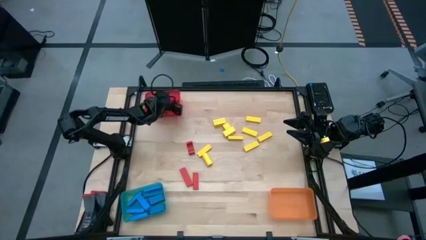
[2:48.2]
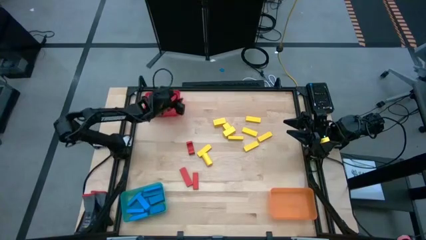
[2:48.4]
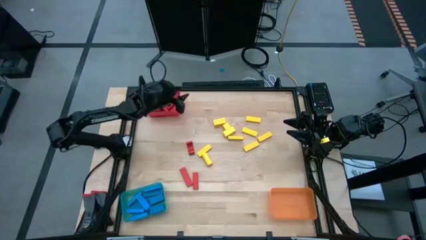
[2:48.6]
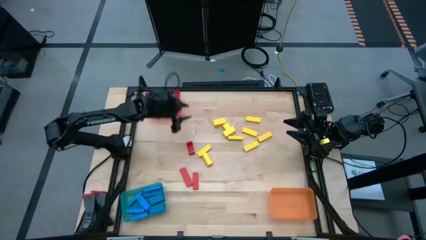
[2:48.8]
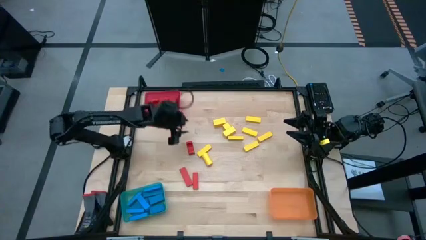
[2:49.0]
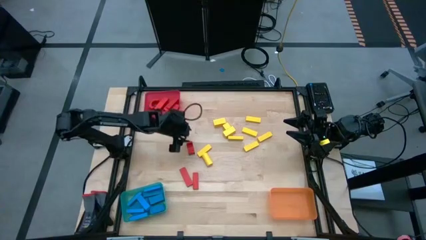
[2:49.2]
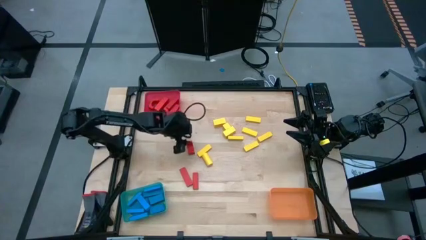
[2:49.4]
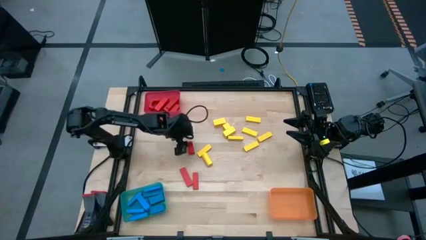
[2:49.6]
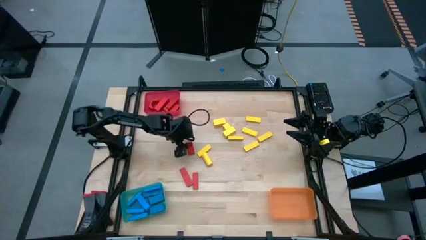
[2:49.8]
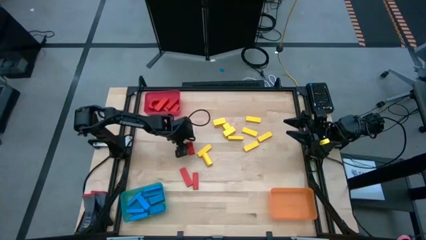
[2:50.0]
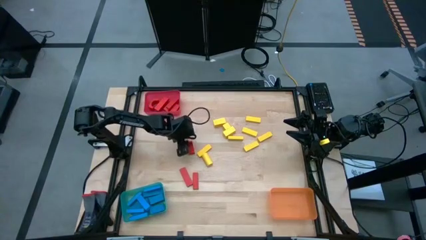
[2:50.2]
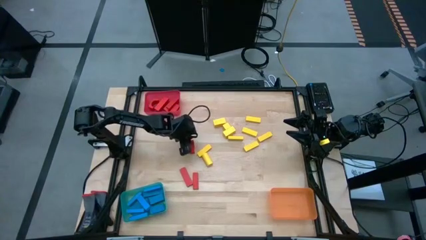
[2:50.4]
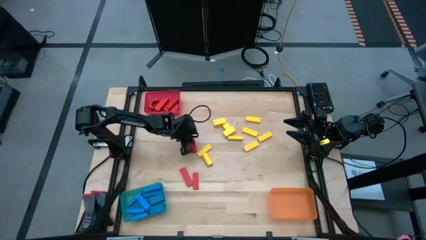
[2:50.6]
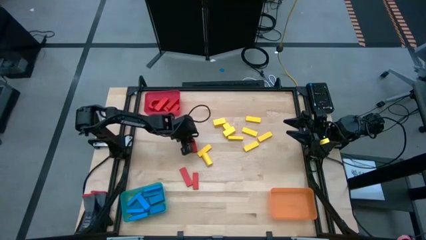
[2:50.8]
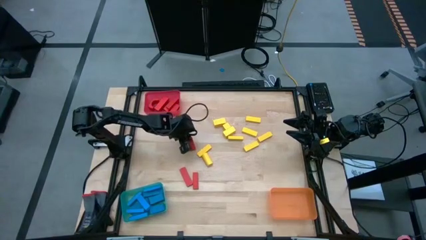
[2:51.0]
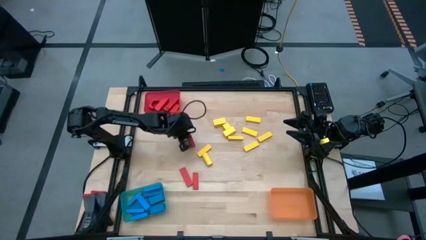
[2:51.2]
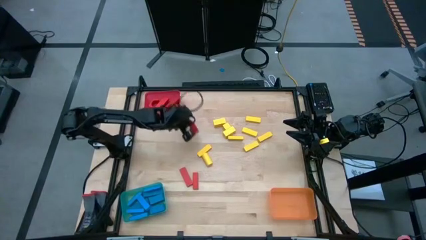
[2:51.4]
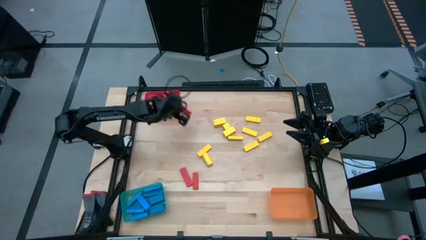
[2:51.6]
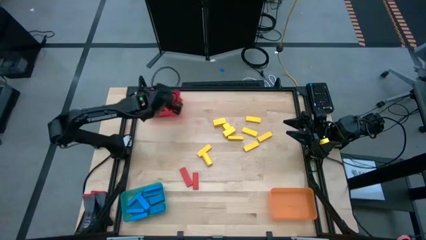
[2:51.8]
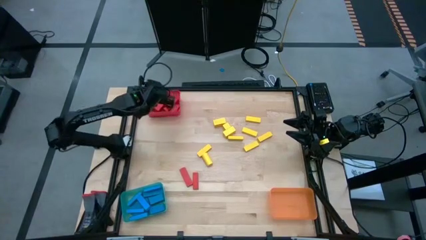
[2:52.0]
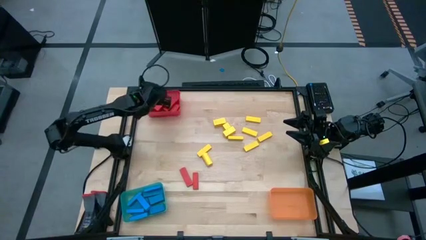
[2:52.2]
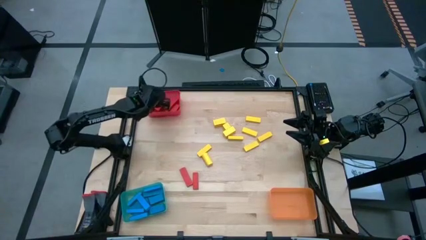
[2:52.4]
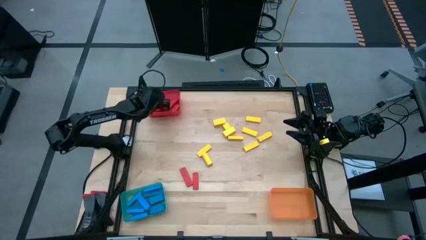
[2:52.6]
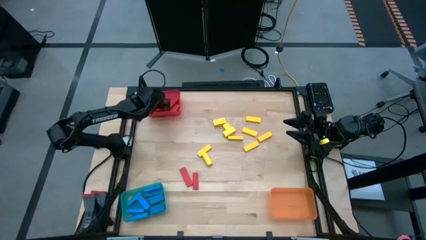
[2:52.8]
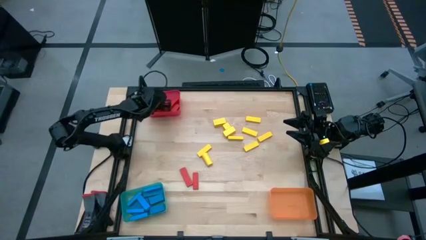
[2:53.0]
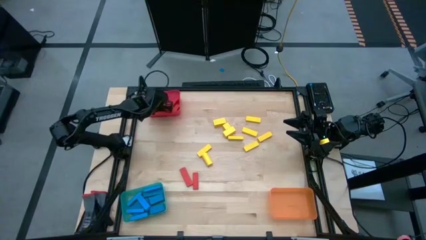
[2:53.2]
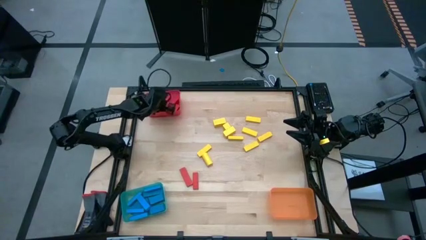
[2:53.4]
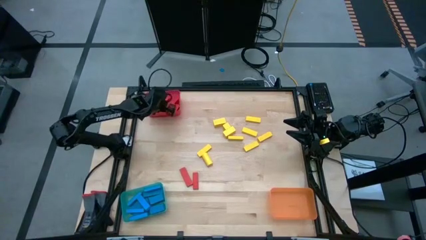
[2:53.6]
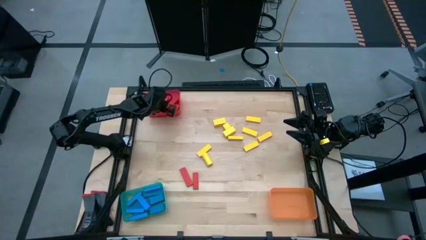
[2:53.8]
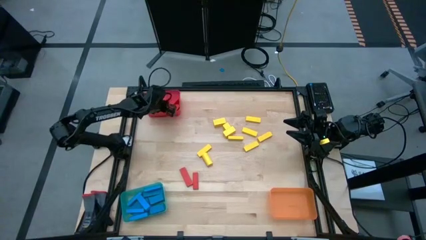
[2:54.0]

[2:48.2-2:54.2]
Task: Sort blocks
Put the red block into the red bin

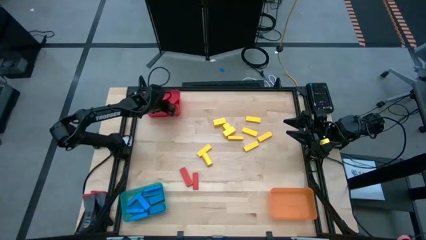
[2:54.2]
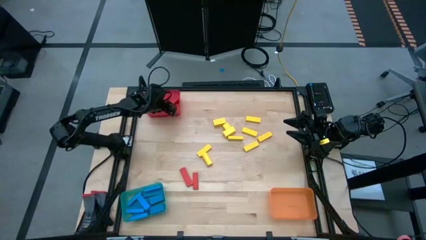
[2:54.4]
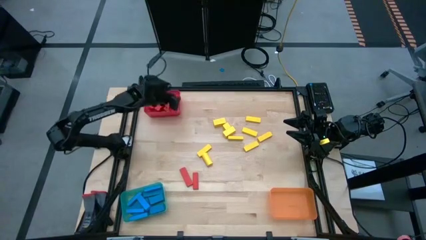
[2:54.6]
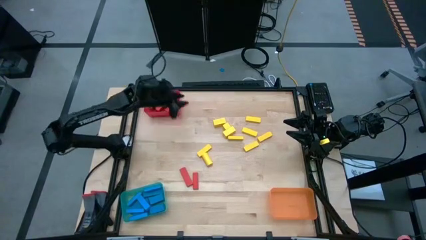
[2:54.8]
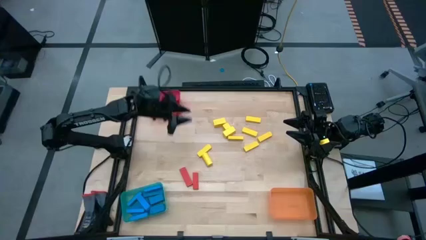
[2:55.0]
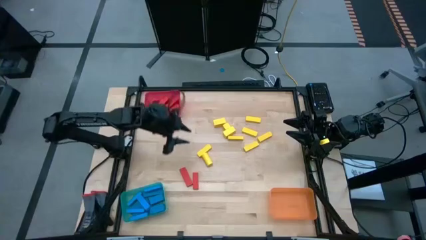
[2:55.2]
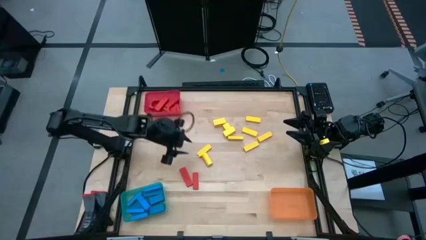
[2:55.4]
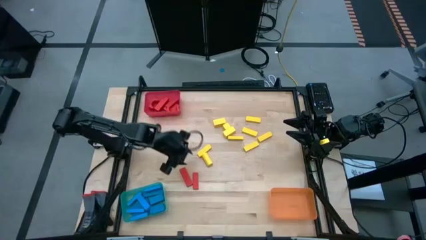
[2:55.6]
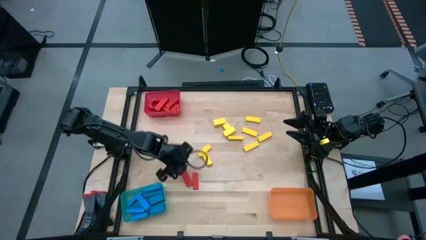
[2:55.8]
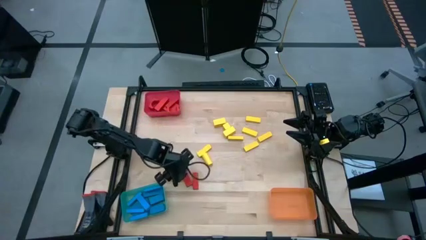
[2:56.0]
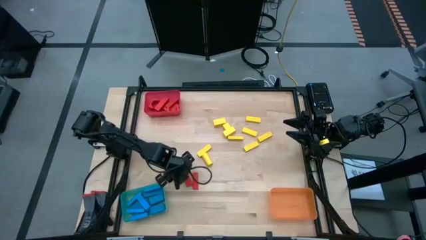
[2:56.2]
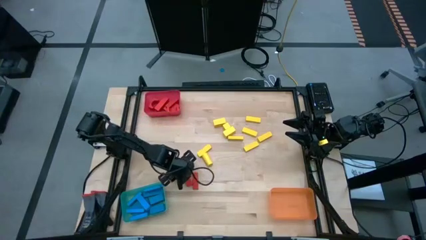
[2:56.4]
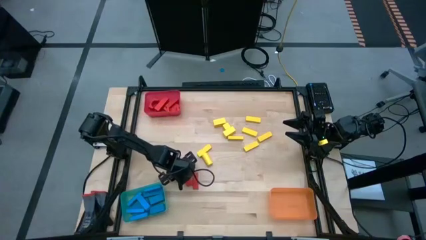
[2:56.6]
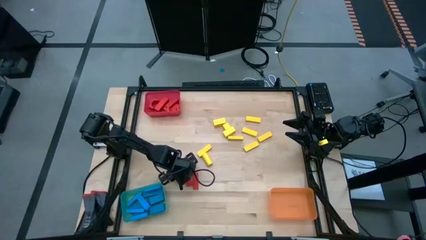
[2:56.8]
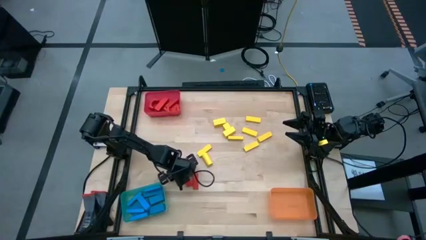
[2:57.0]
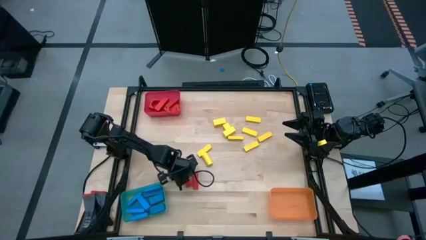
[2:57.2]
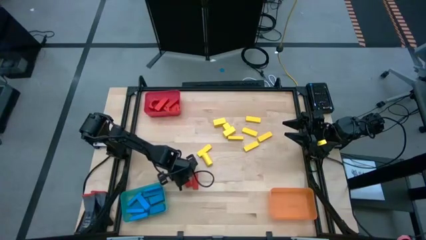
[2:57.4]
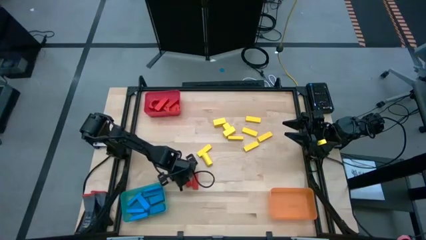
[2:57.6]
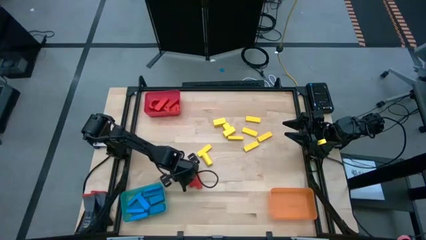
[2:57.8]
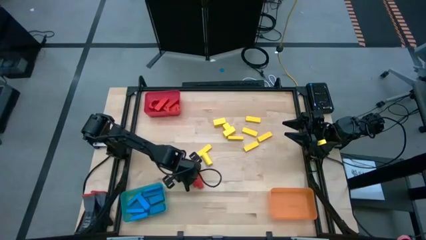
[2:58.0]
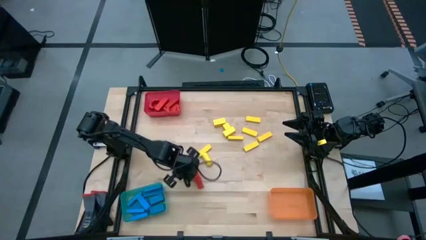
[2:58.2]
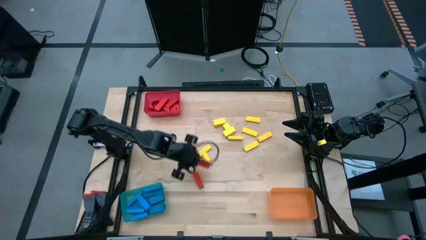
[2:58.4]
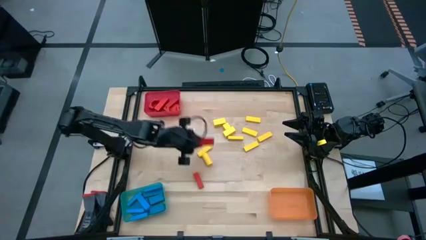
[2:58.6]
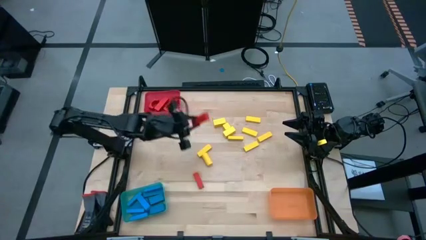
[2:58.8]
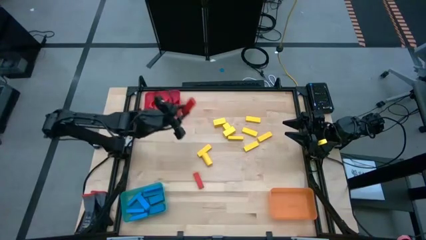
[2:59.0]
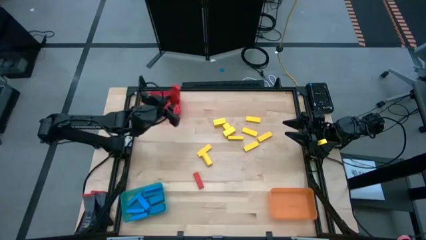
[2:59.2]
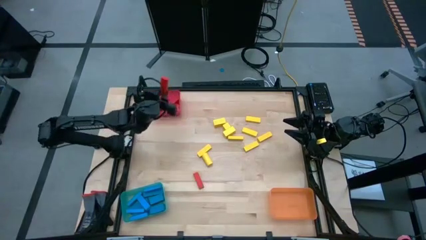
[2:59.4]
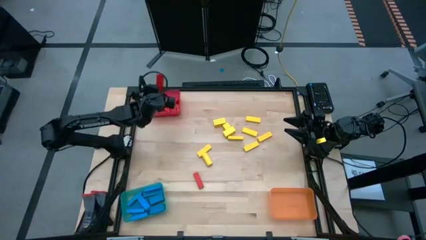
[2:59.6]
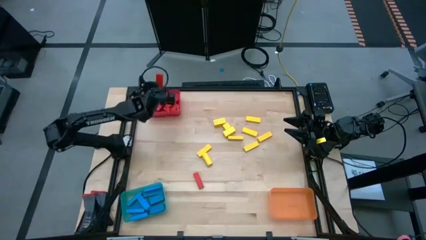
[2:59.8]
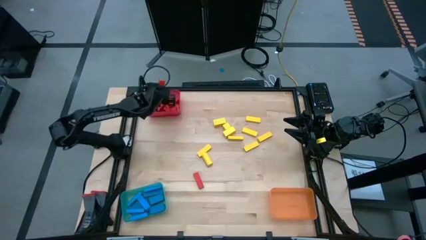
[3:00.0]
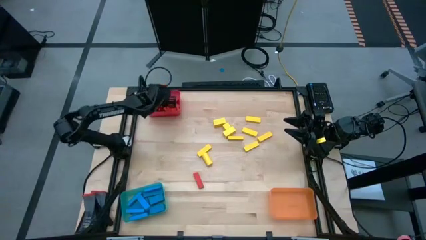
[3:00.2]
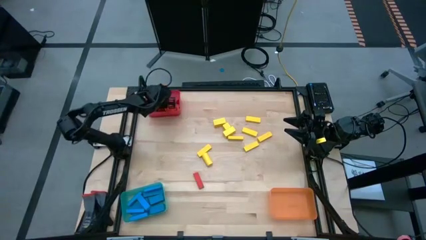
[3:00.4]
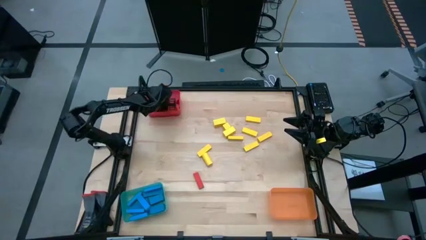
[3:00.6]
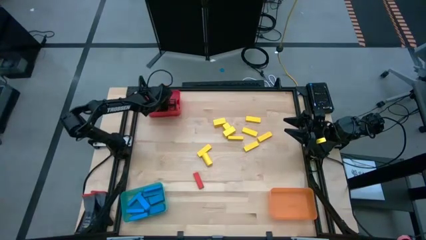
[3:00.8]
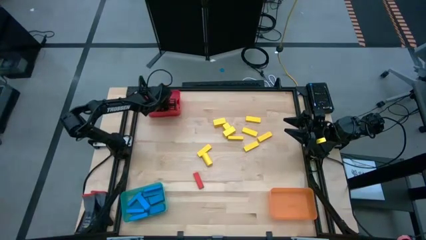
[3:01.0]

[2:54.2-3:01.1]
Put the red block into the red bin

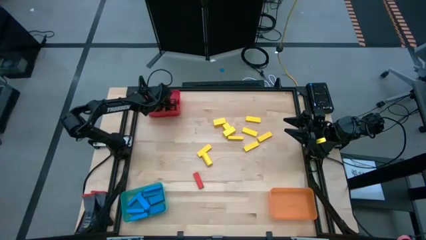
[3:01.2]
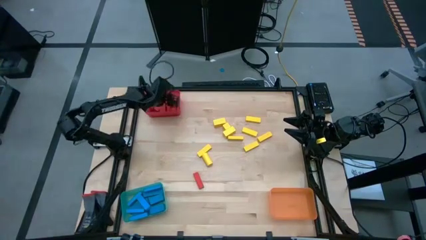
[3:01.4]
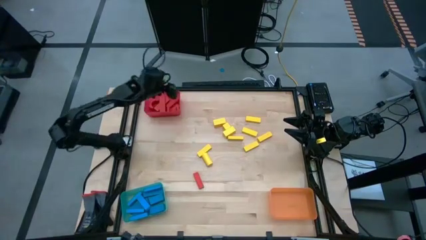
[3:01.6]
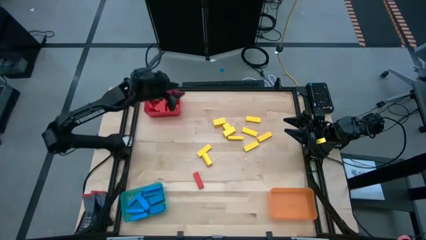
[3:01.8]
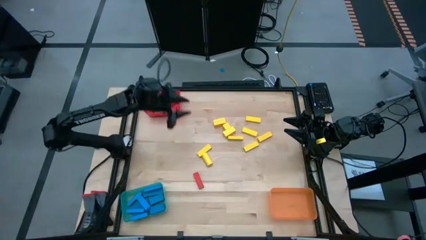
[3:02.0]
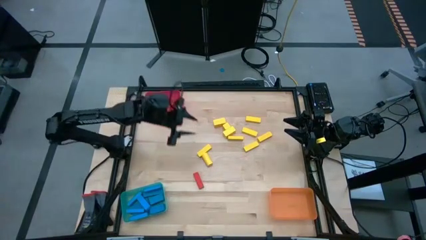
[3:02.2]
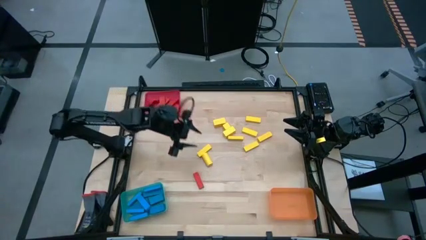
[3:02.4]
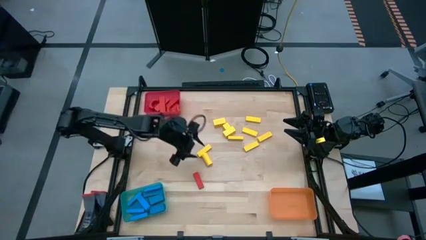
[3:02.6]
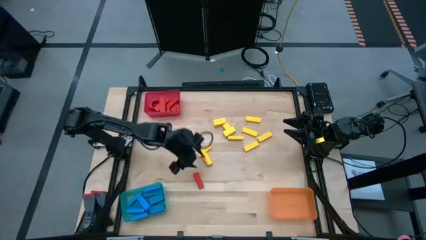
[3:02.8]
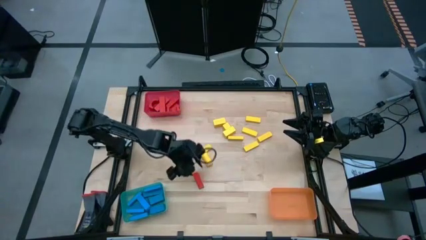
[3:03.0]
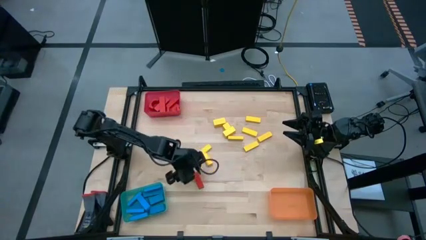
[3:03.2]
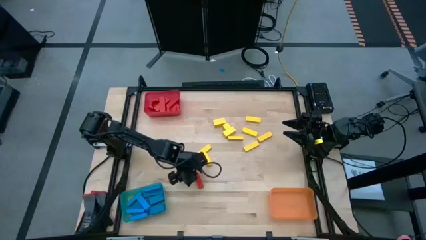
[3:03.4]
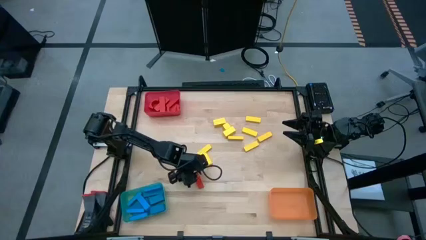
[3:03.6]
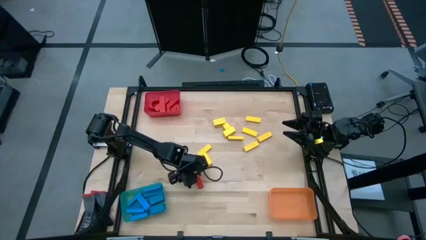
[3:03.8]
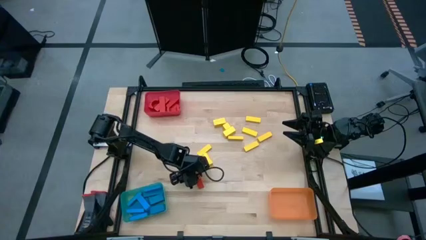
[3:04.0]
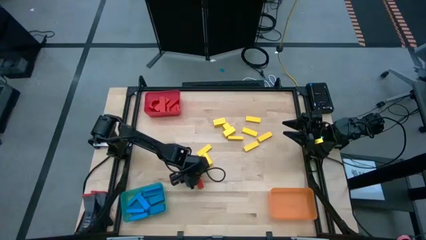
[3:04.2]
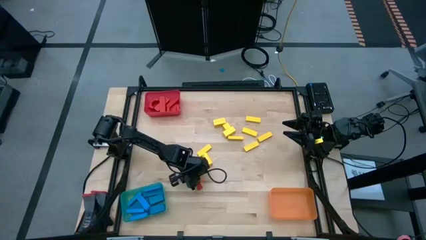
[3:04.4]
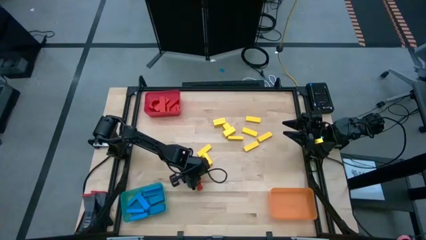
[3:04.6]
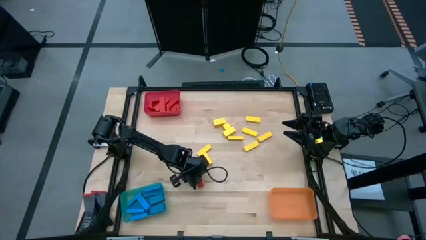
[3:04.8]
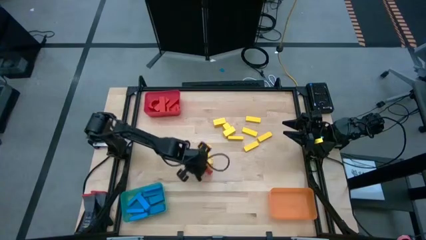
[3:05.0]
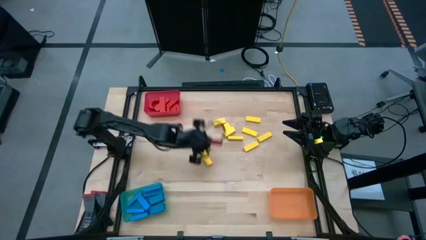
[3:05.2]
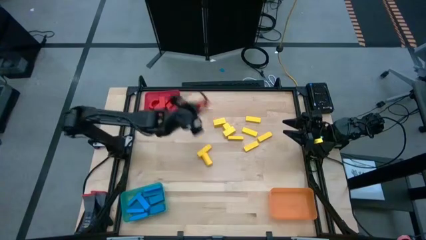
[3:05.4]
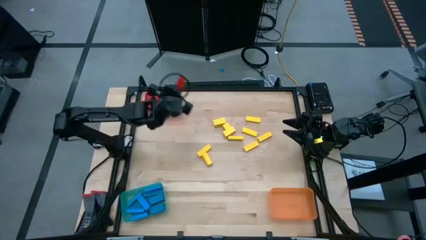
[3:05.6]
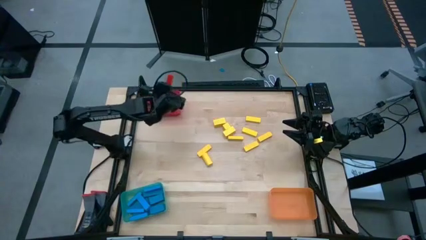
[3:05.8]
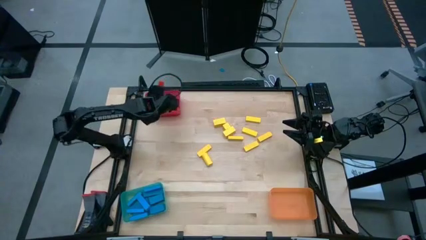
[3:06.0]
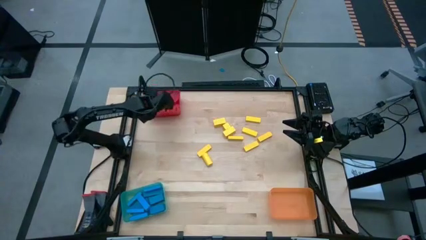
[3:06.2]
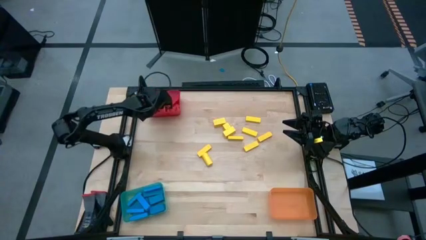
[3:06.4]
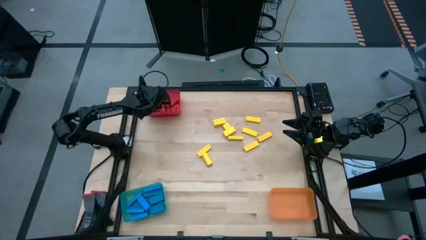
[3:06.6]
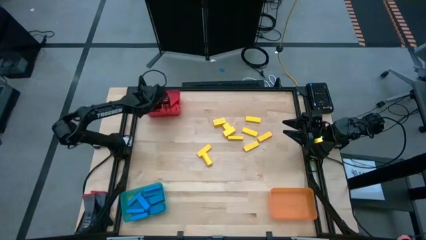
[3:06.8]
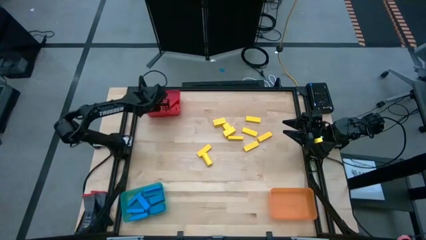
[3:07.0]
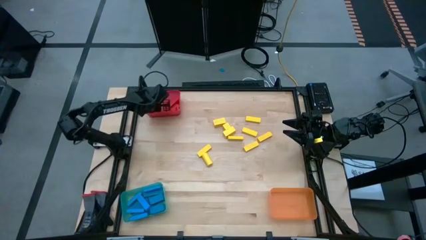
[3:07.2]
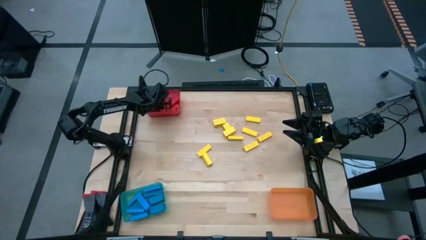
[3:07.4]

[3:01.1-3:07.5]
Put the red block into the red bin
